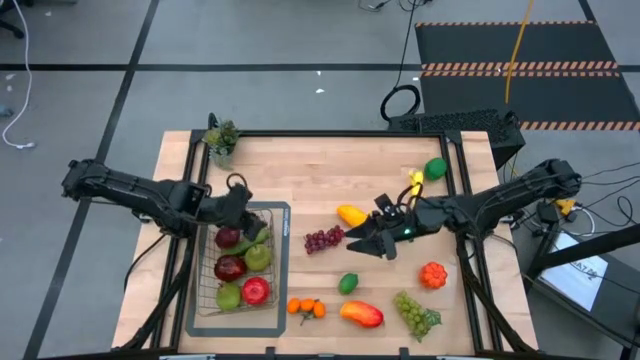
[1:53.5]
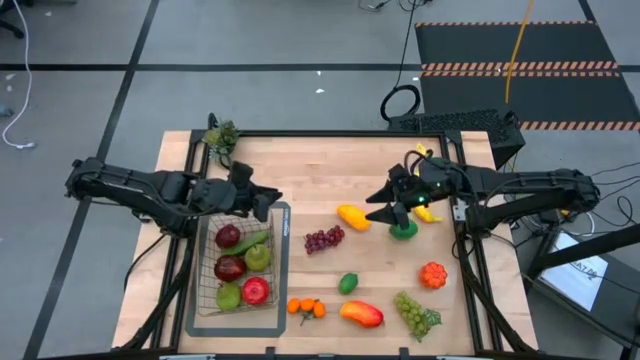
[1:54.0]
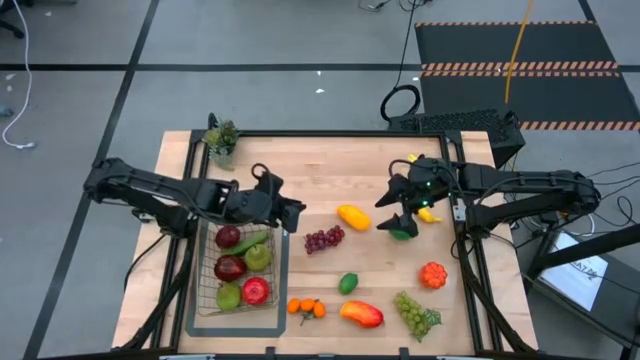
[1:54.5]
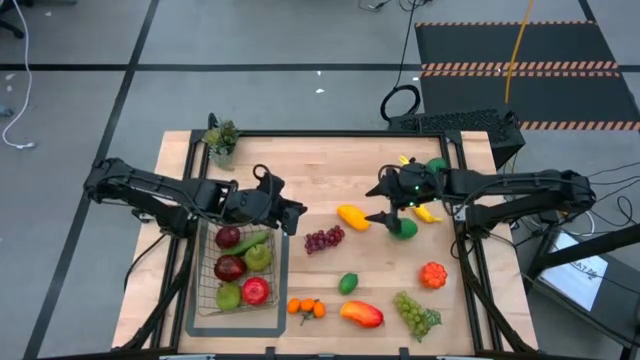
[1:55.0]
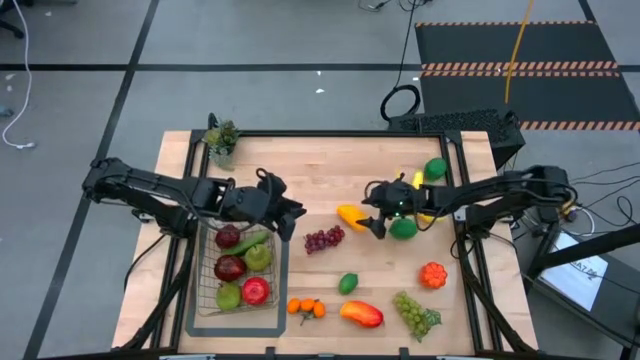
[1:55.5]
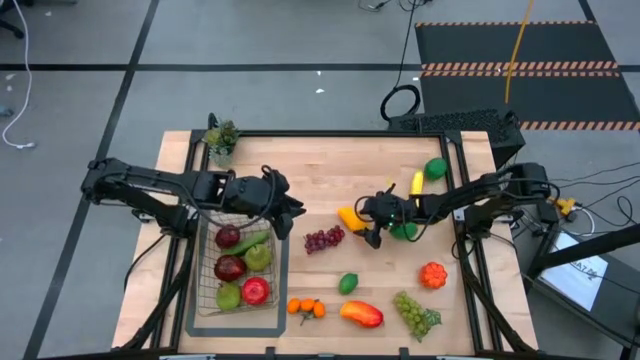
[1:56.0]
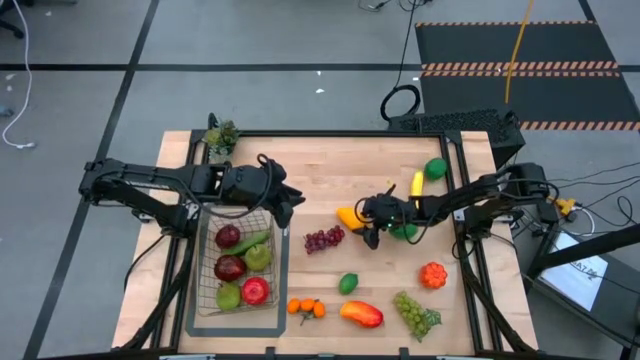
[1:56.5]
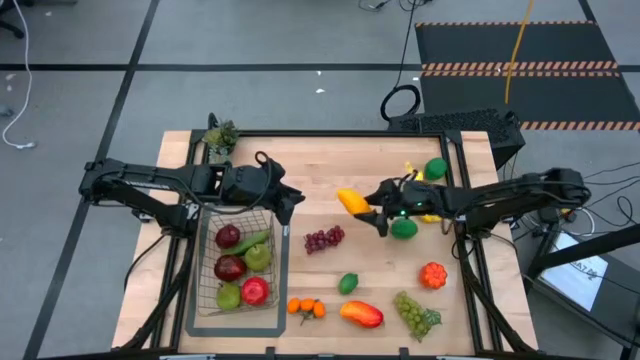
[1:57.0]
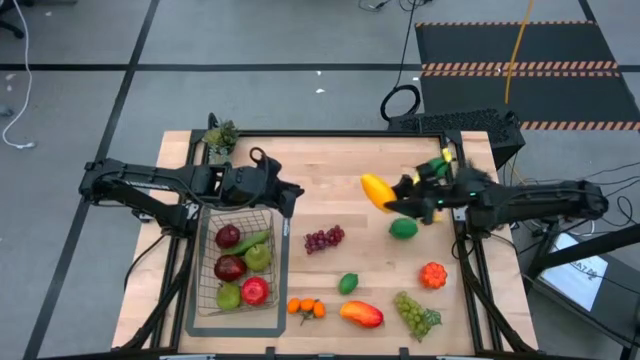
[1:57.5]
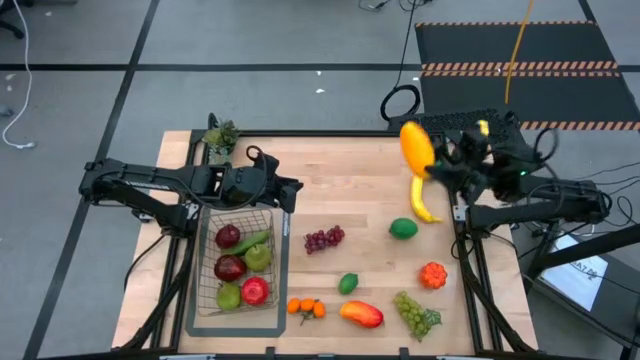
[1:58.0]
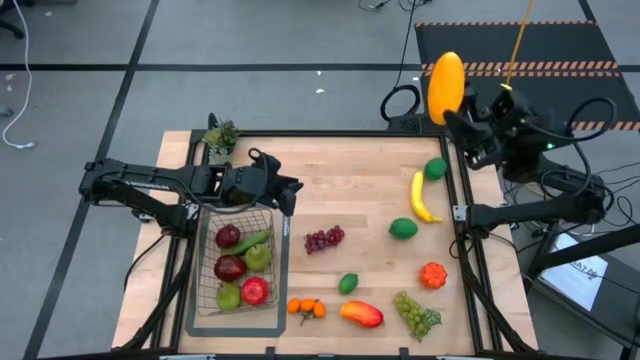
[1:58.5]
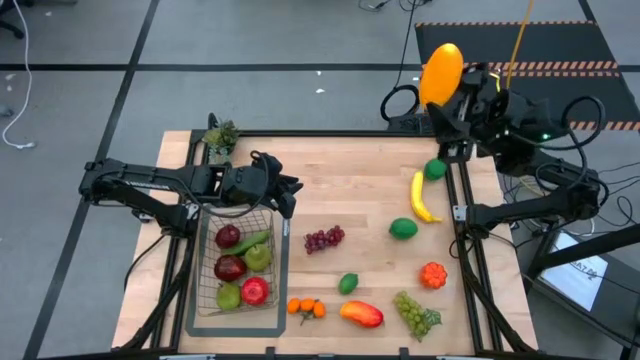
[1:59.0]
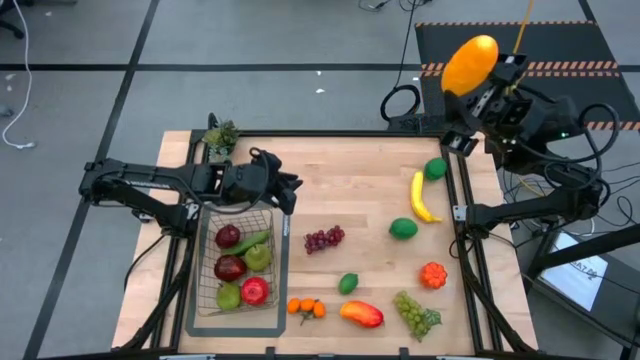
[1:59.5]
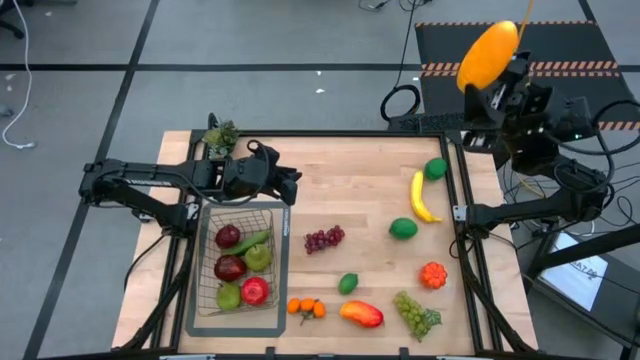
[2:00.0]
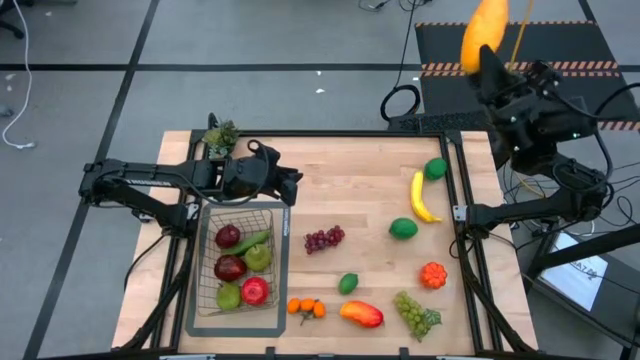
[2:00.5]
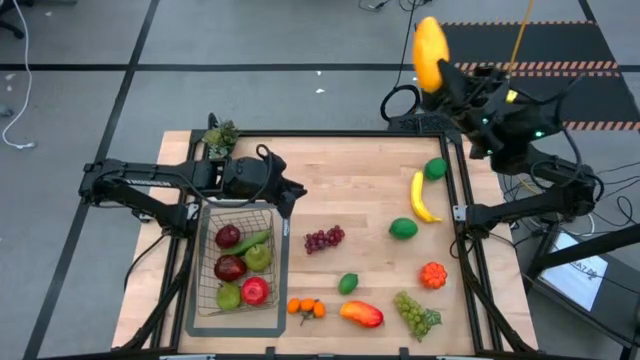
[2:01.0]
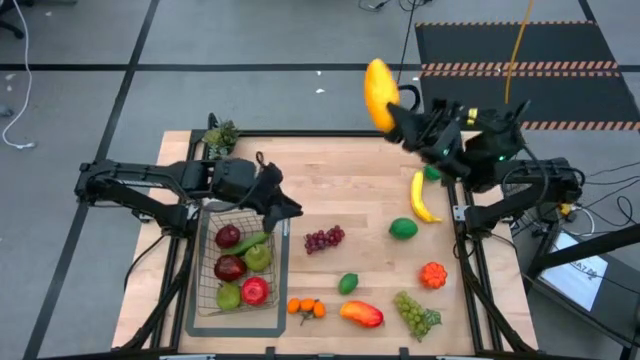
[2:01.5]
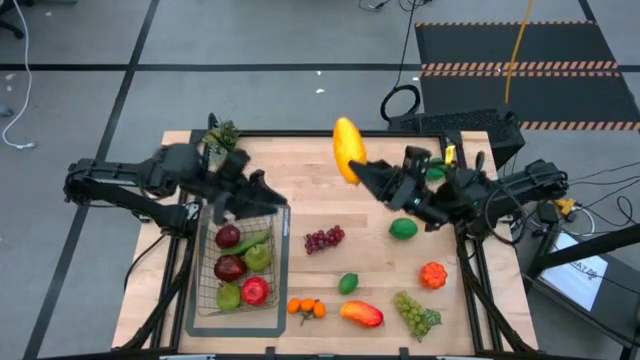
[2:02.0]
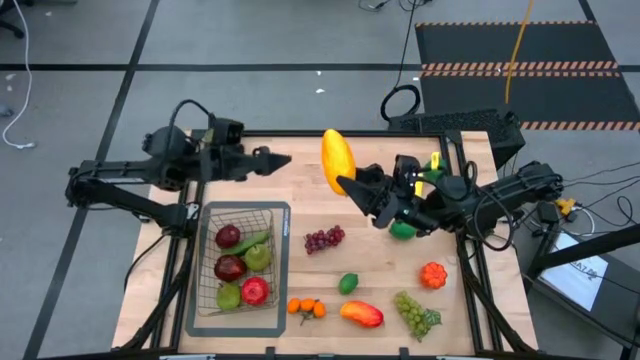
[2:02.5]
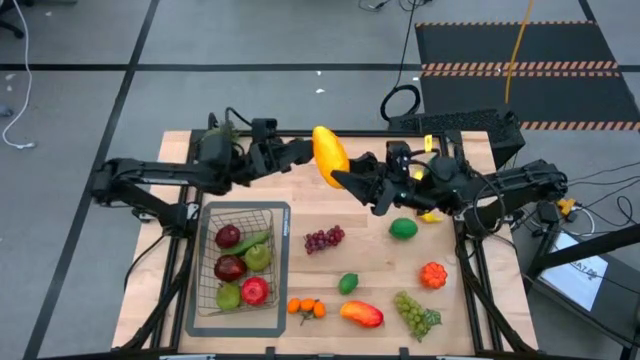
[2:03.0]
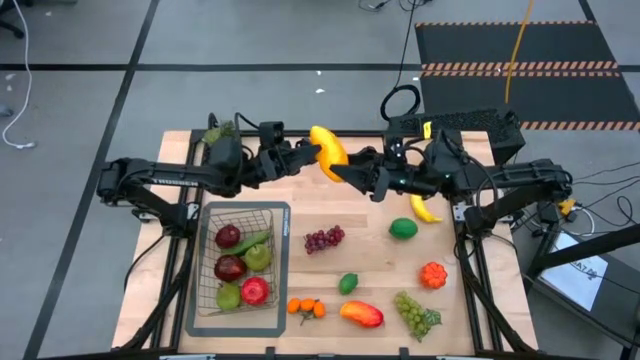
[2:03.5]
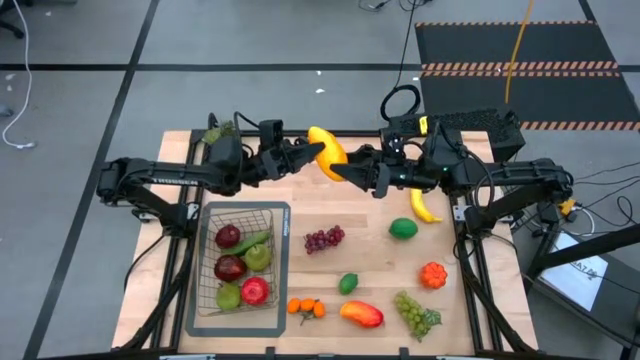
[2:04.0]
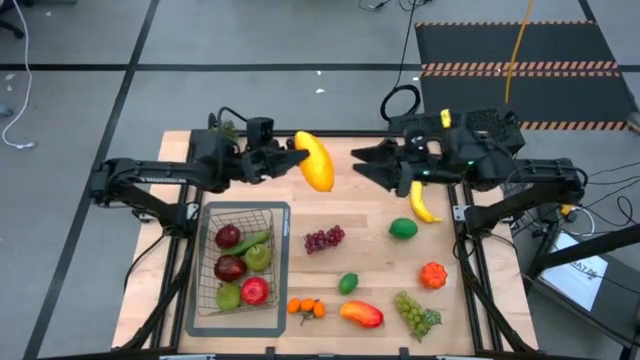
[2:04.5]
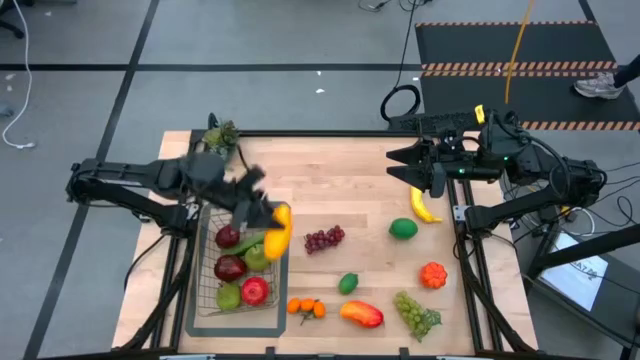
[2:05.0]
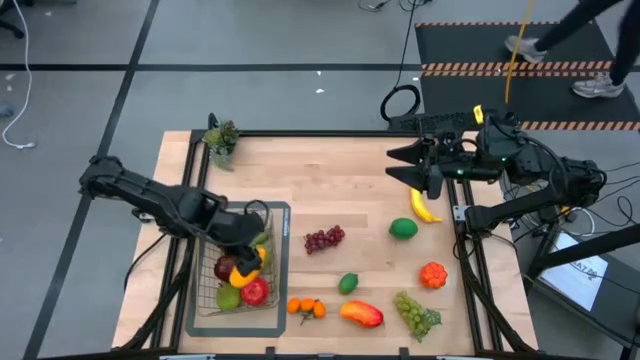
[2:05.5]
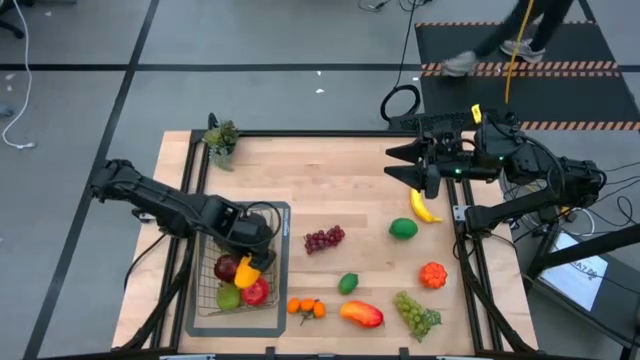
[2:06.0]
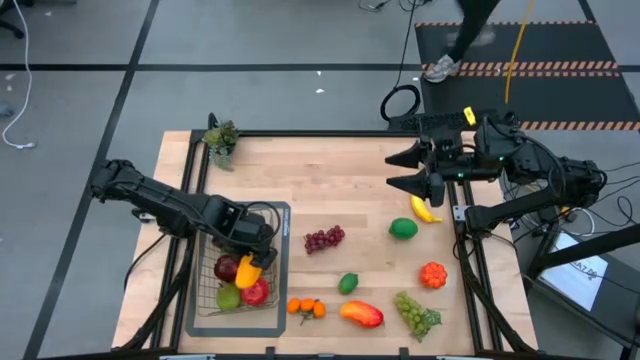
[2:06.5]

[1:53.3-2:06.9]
Task: Build produce basket
Put the yellow mango into the wire basket

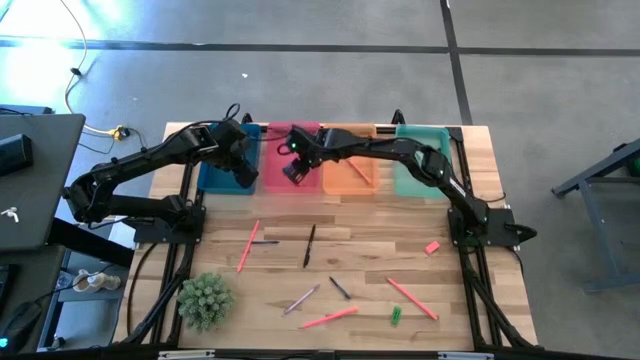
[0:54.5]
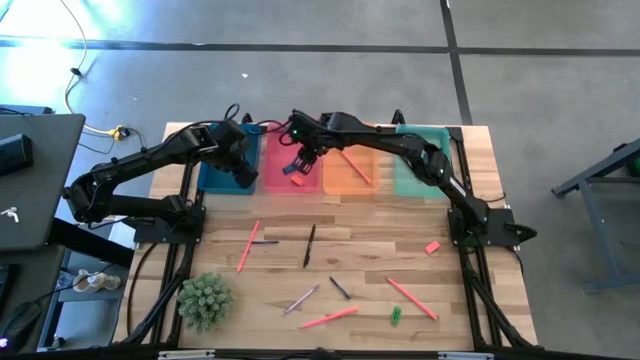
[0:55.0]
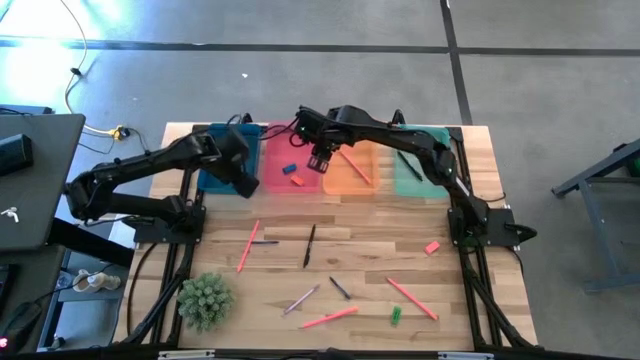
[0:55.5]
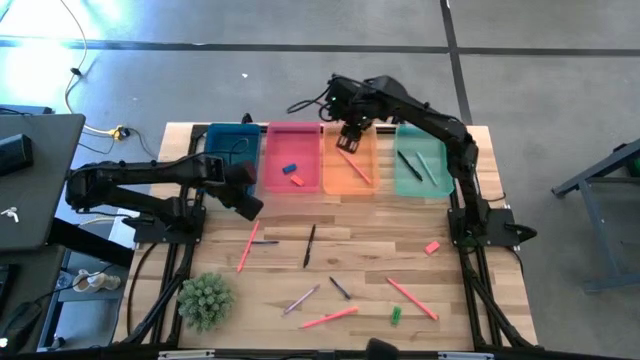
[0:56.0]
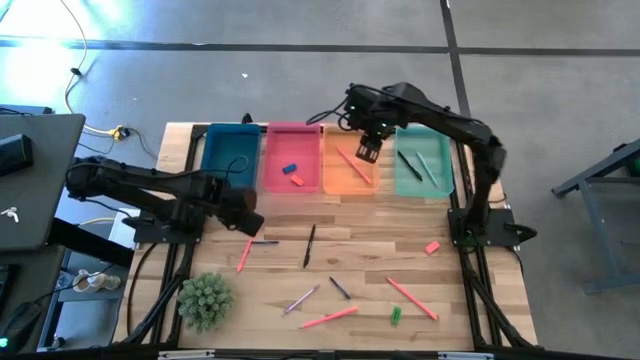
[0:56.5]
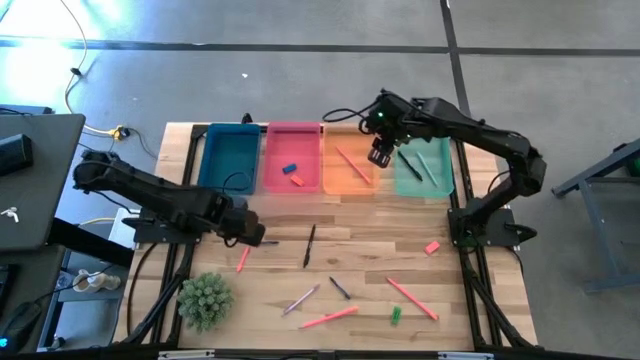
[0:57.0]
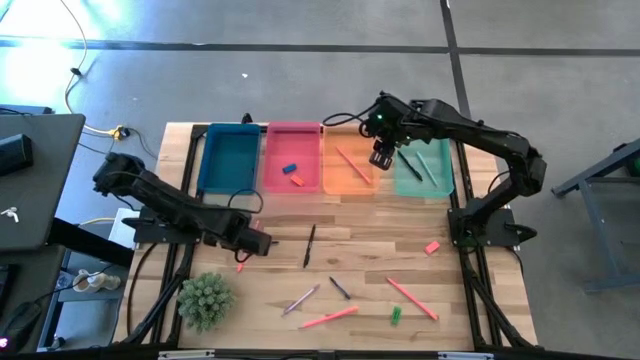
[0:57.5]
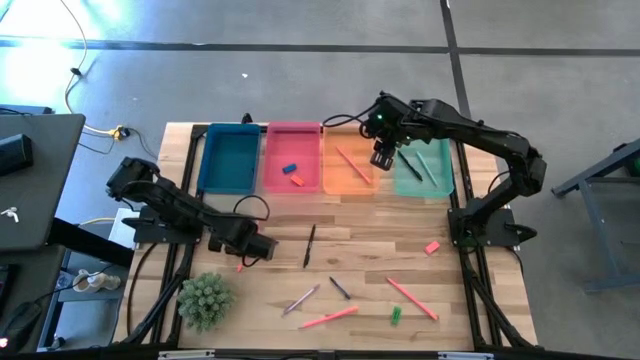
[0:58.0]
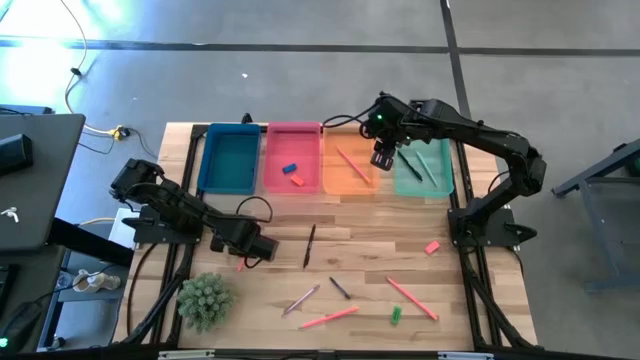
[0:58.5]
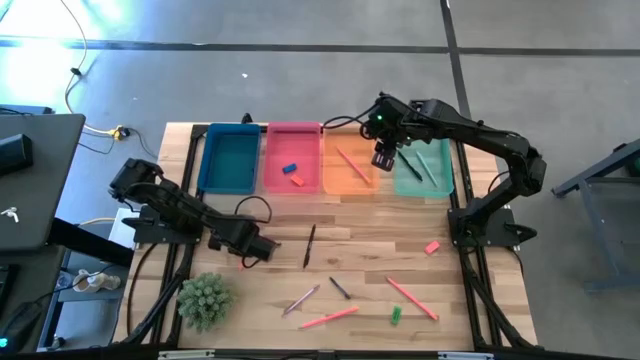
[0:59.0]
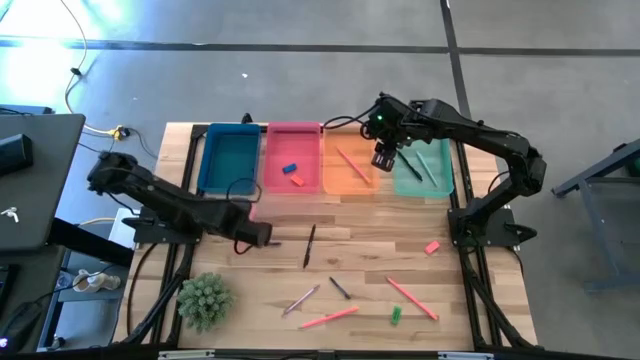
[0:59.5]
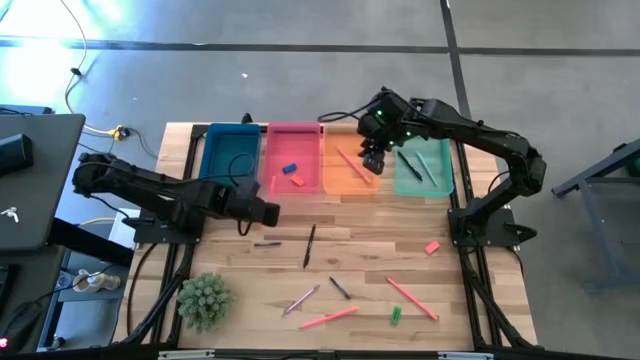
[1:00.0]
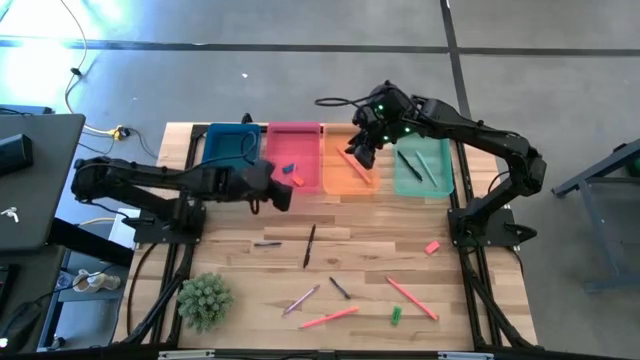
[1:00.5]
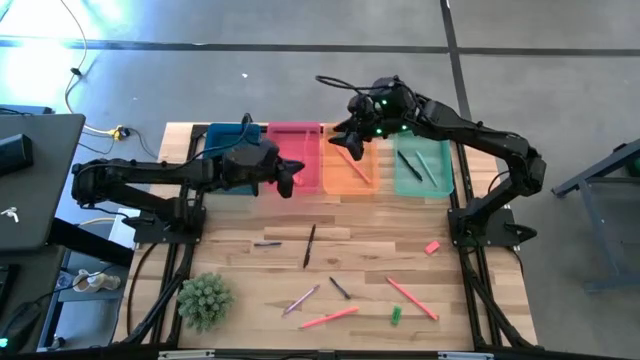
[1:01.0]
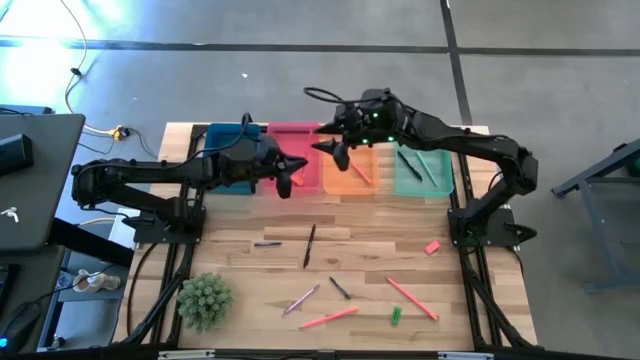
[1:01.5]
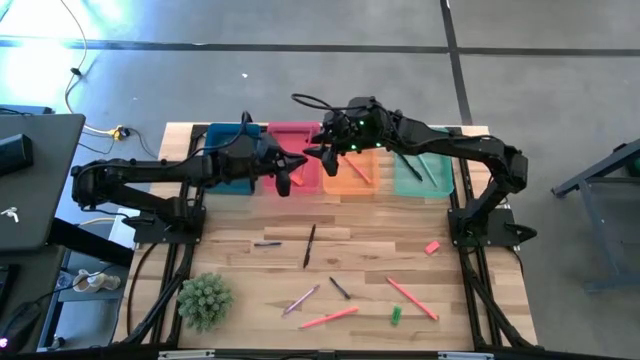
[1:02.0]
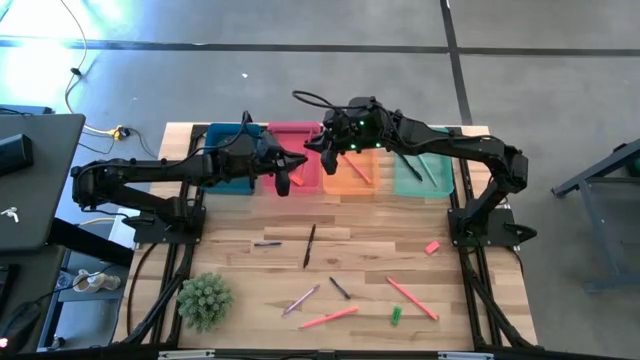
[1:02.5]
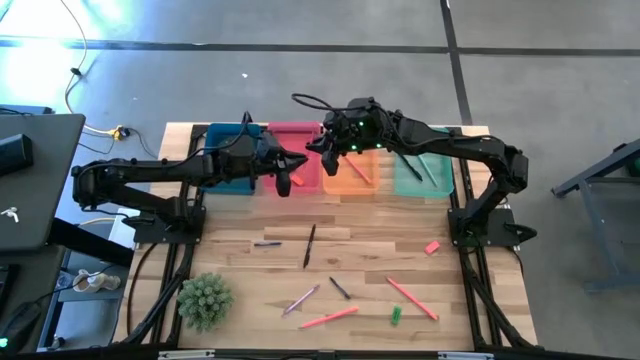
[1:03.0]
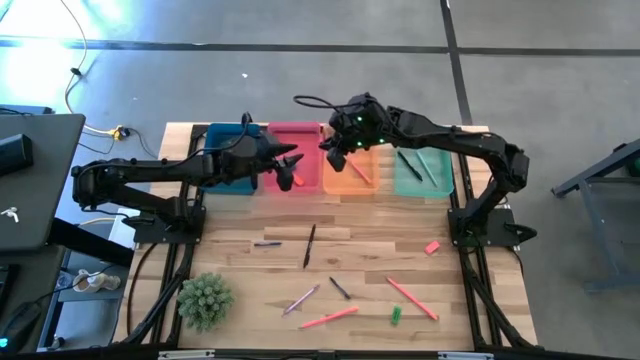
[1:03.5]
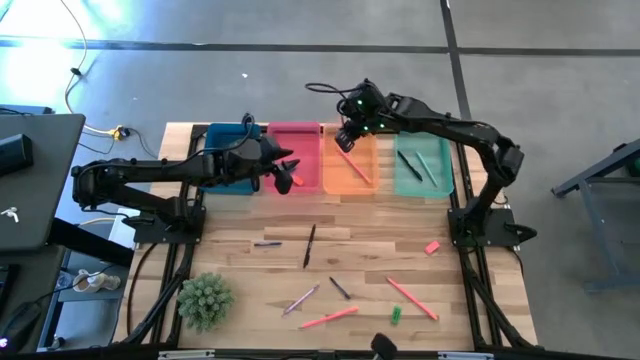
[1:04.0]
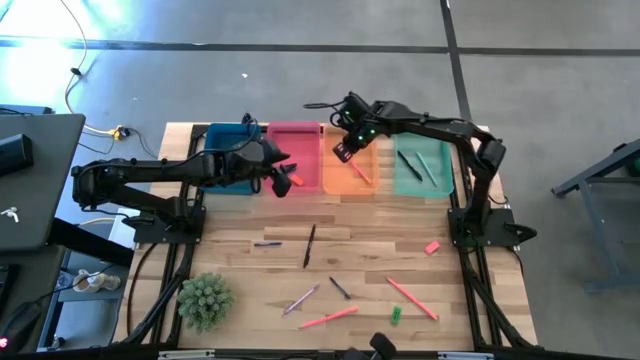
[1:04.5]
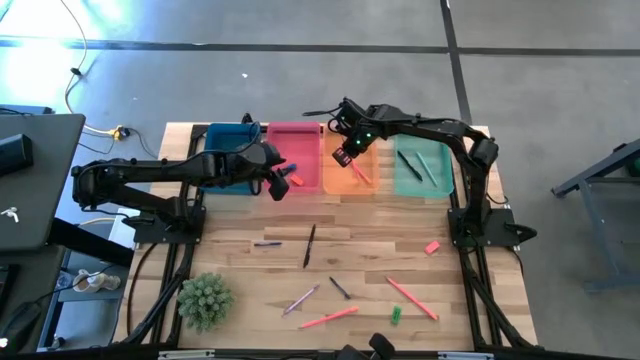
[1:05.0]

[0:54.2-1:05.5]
Task: Sort crayons/erasers/pens/pencils in bins
Put the pink pencil into the orange bin
